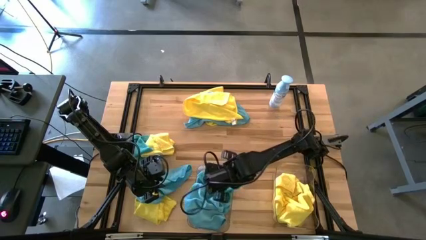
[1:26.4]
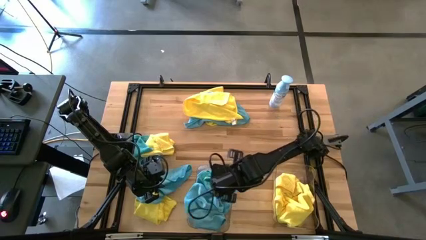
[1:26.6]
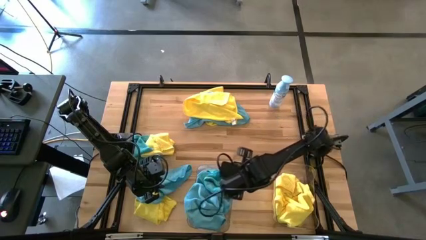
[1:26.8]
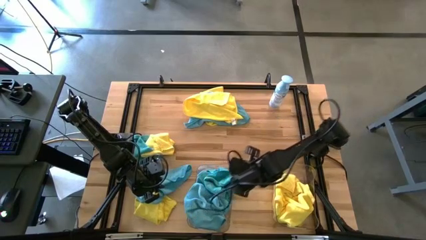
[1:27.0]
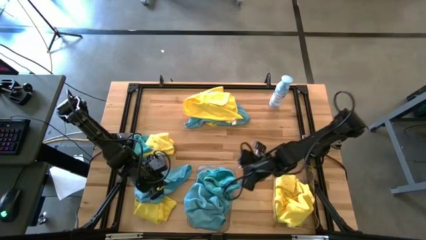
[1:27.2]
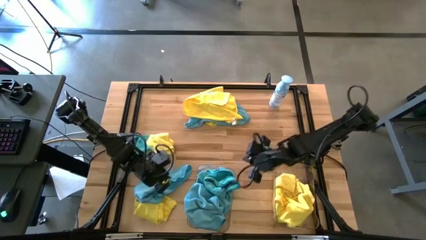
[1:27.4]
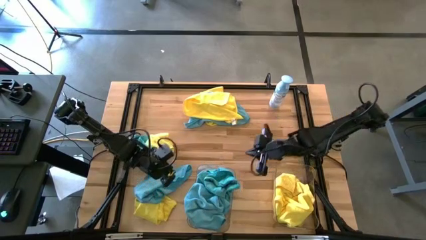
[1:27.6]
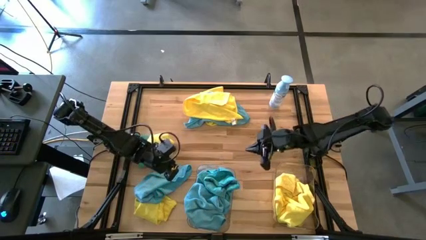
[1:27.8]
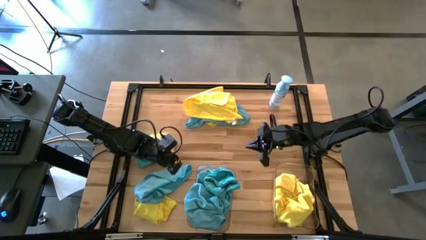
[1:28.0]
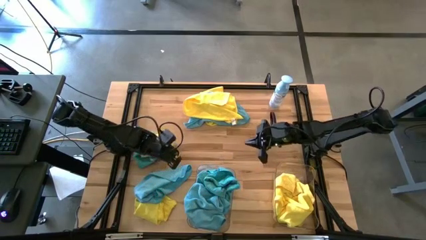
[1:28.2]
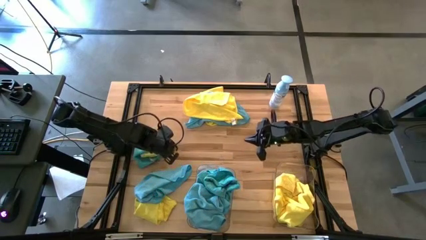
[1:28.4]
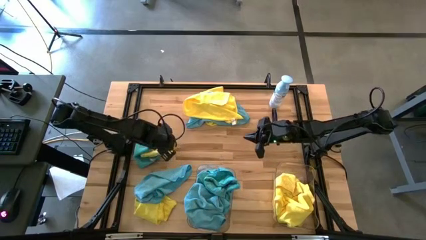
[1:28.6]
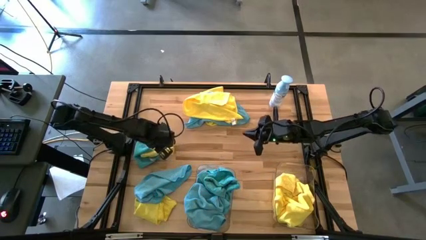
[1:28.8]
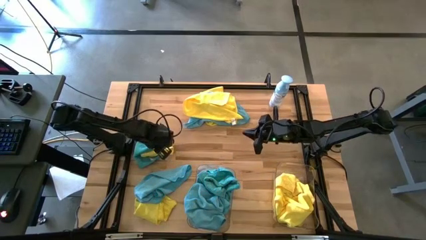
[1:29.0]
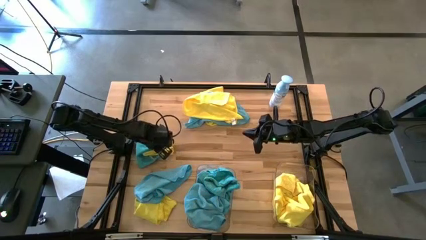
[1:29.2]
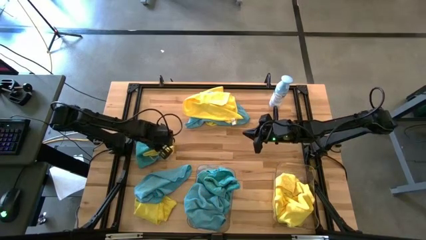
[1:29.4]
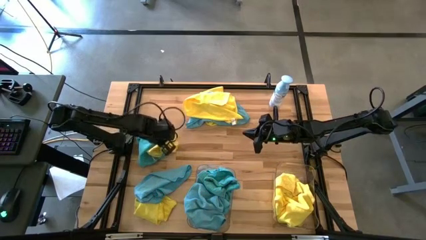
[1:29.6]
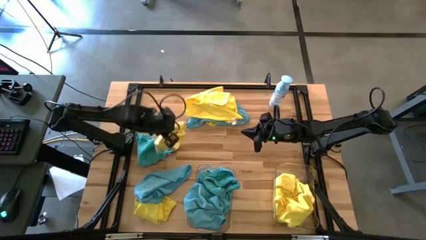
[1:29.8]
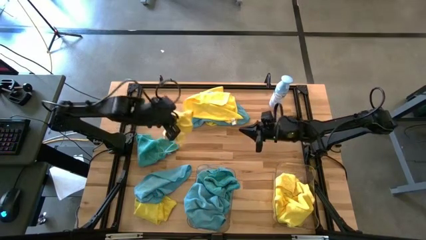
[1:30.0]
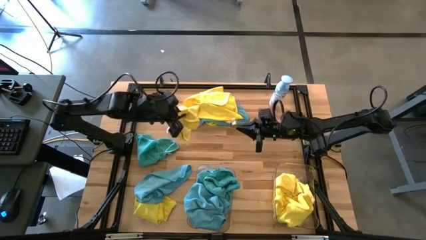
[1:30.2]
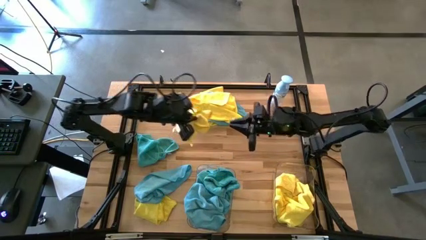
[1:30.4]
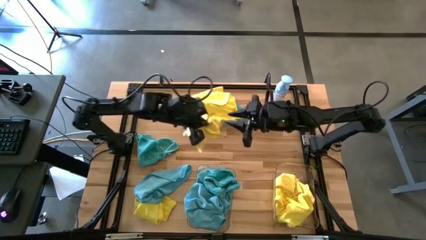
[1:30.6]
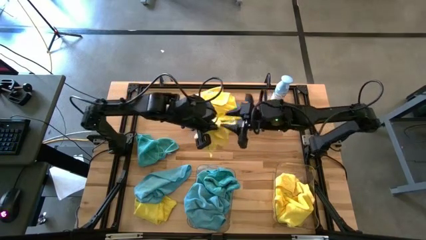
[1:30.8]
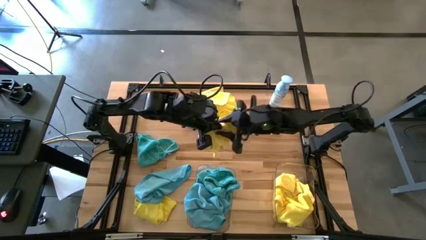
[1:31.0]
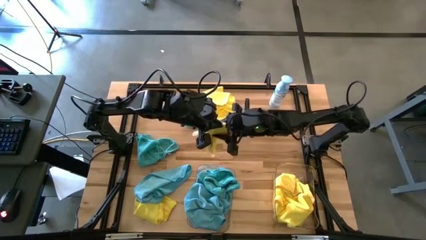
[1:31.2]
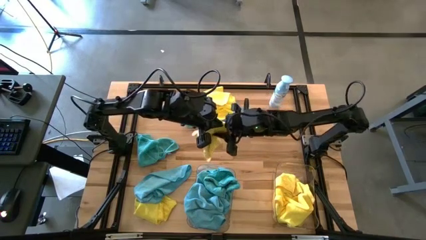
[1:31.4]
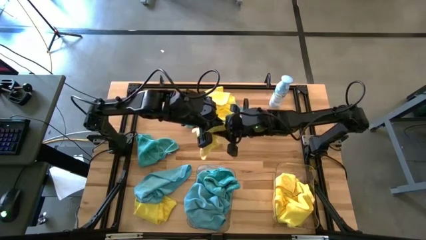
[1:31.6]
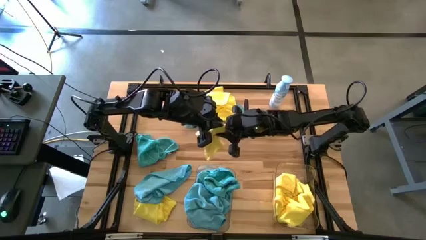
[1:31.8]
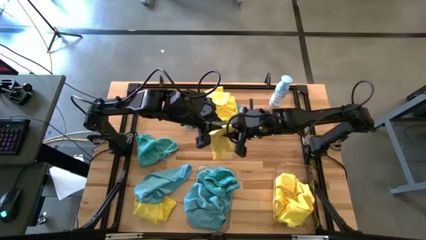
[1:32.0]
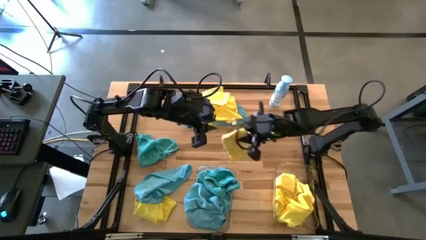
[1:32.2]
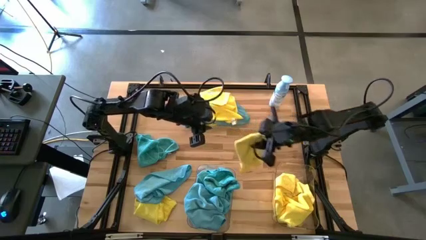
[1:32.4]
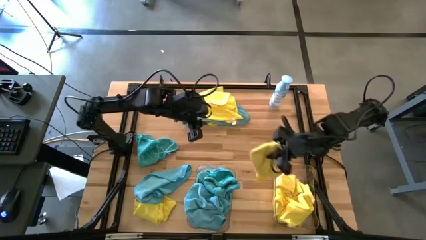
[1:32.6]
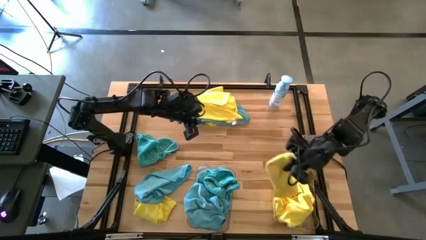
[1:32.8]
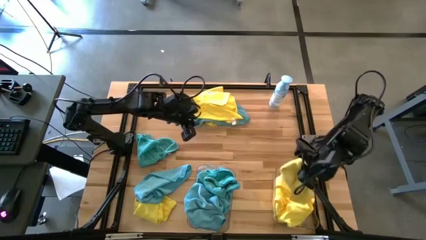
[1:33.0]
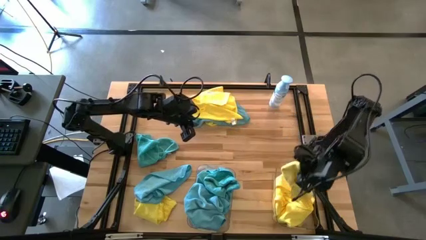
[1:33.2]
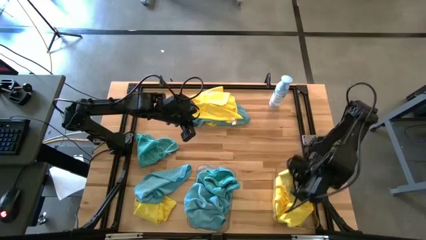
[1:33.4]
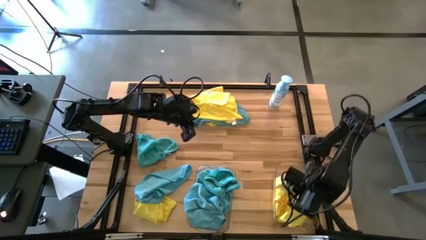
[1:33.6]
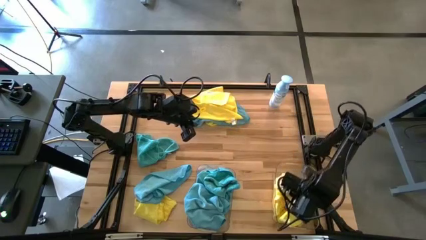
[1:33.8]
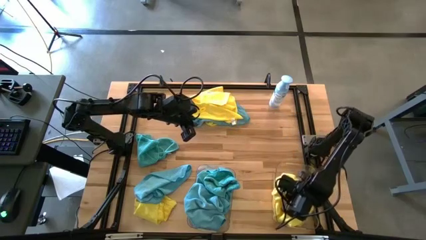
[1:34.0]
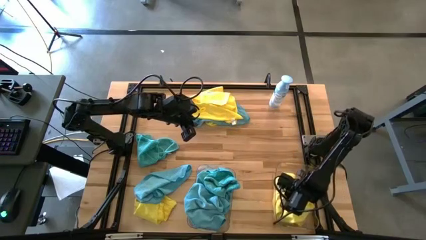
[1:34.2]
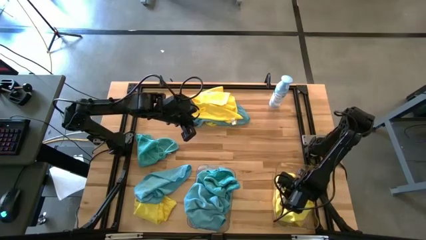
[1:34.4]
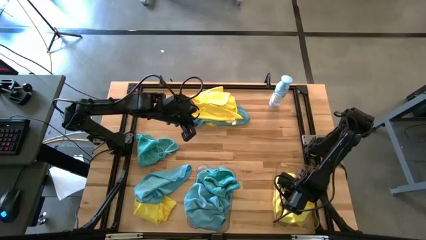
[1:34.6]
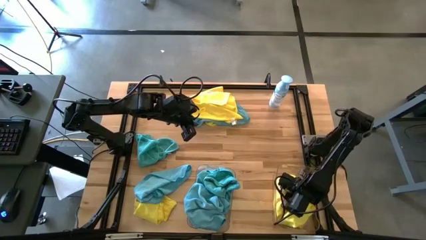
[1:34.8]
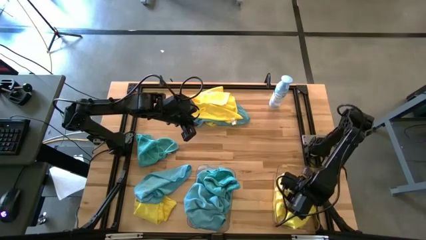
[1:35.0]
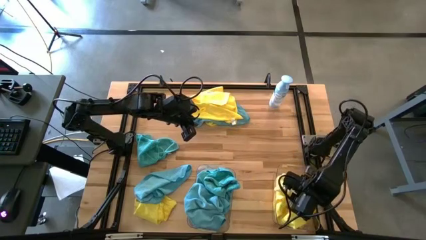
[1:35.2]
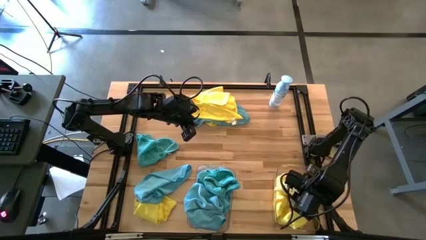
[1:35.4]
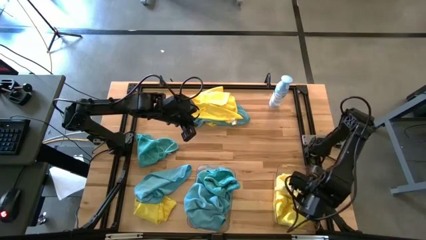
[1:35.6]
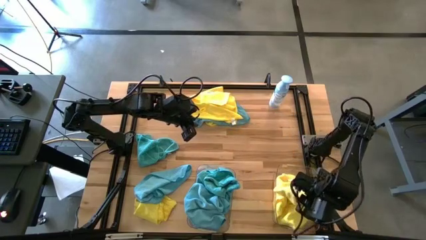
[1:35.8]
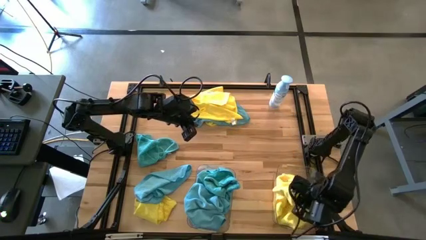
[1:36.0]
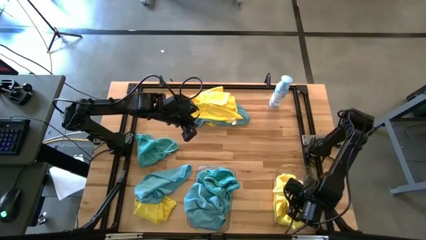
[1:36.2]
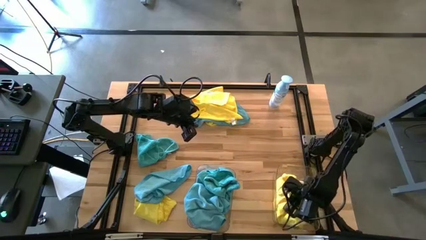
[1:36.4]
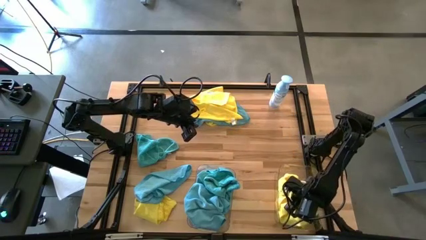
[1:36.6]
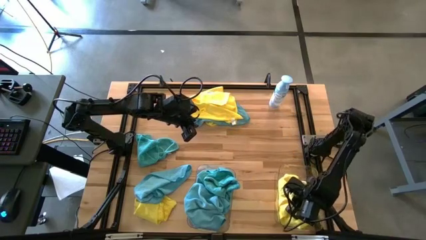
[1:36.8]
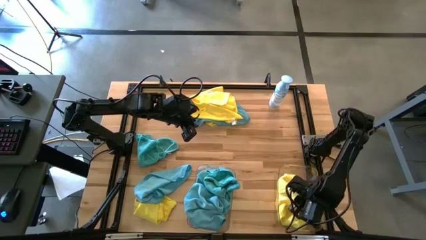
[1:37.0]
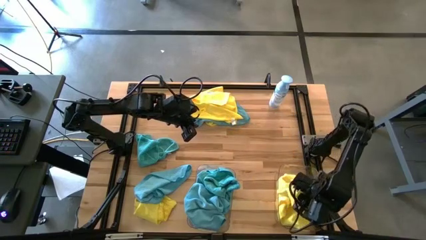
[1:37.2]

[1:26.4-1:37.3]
Task: Sort microfiber towel by color & place in baskets
Put the yellow towel into the right transparent bin

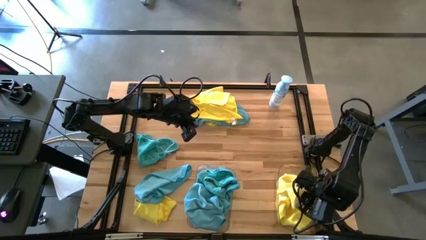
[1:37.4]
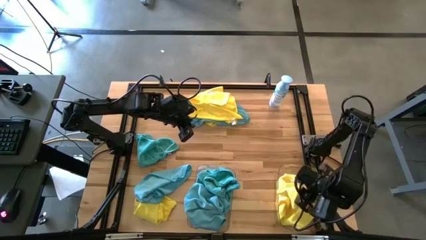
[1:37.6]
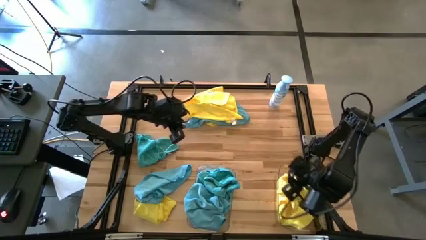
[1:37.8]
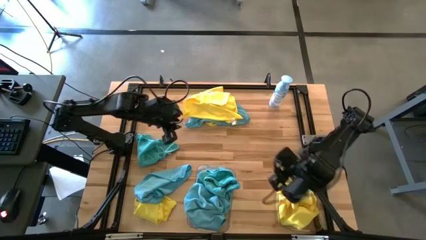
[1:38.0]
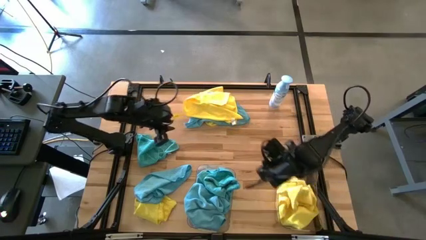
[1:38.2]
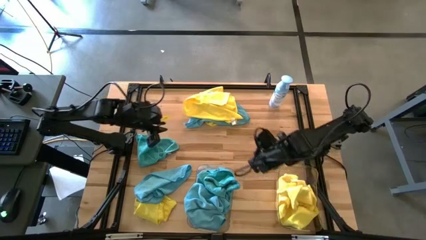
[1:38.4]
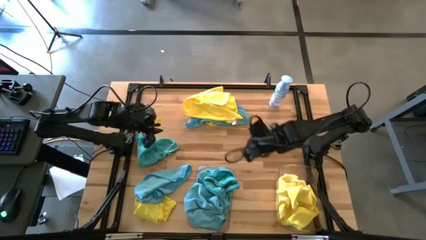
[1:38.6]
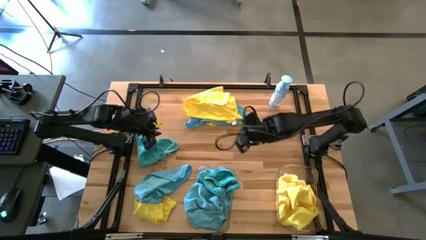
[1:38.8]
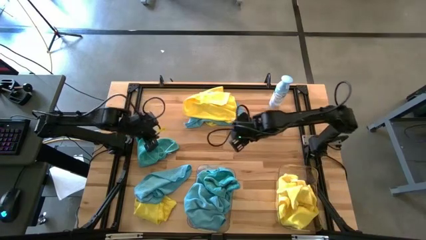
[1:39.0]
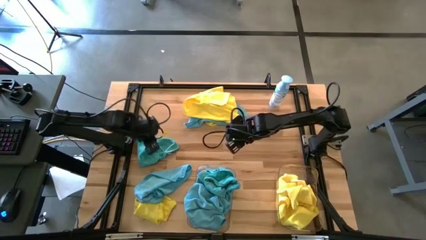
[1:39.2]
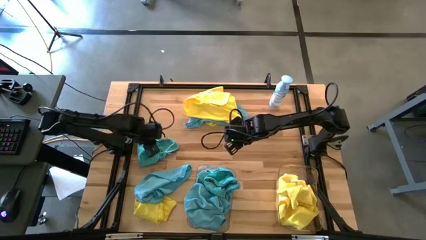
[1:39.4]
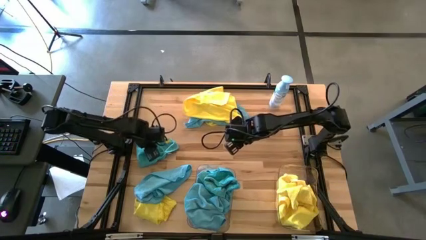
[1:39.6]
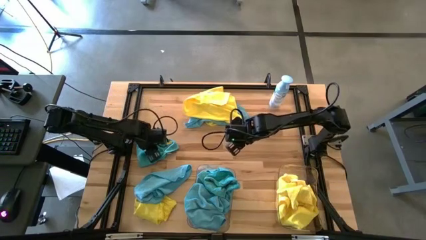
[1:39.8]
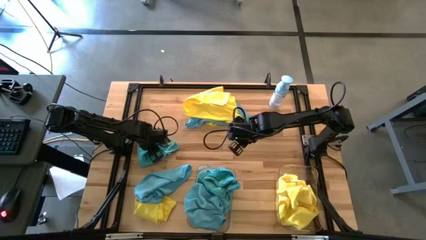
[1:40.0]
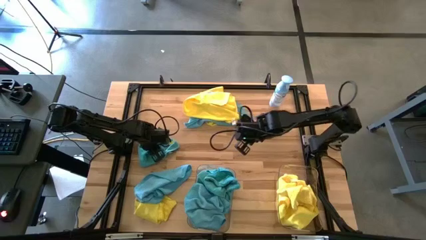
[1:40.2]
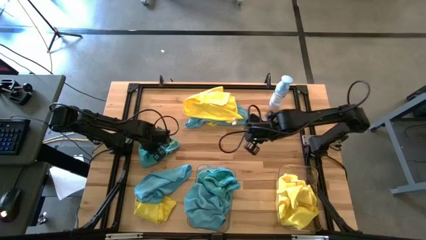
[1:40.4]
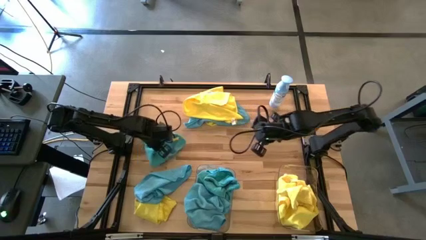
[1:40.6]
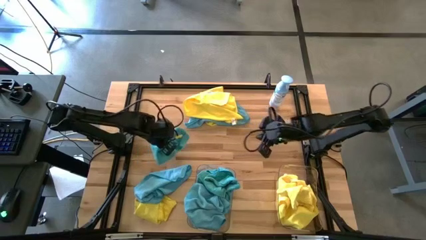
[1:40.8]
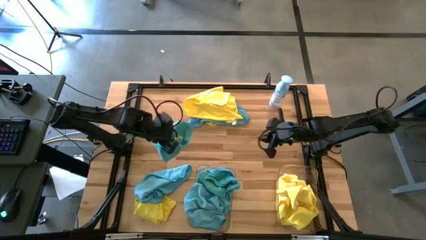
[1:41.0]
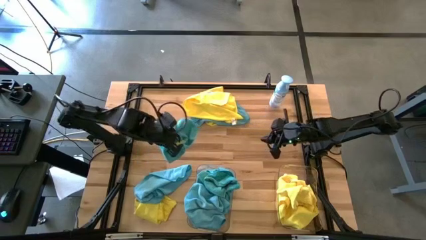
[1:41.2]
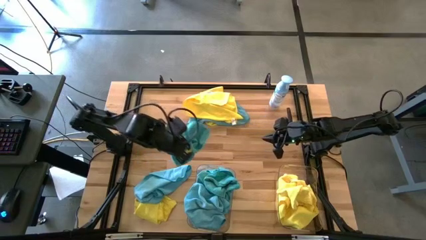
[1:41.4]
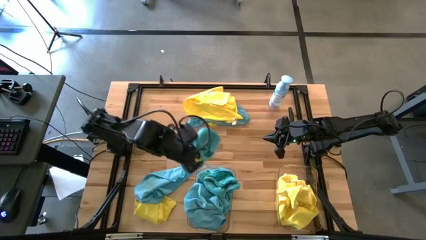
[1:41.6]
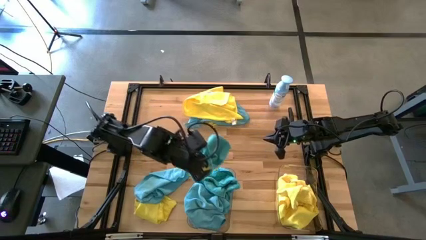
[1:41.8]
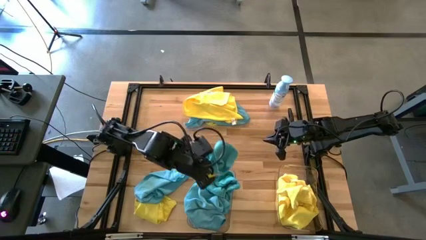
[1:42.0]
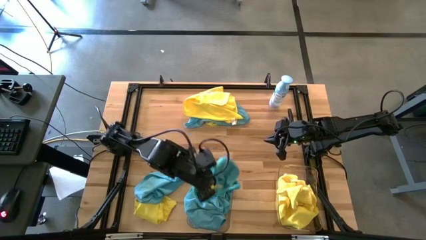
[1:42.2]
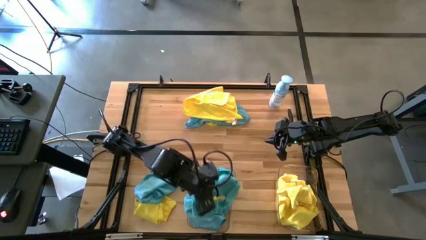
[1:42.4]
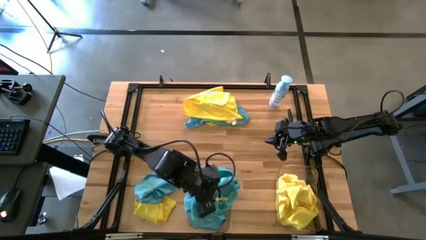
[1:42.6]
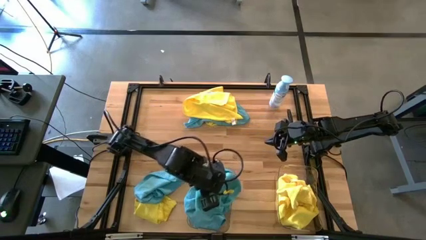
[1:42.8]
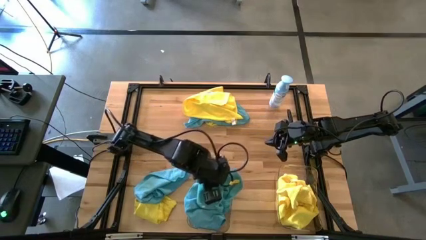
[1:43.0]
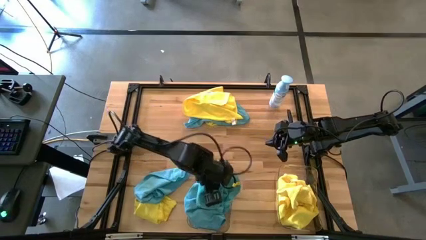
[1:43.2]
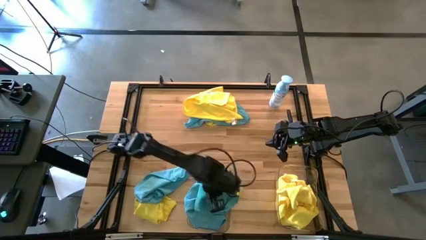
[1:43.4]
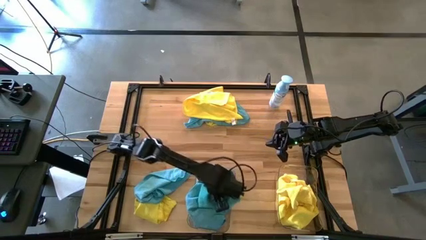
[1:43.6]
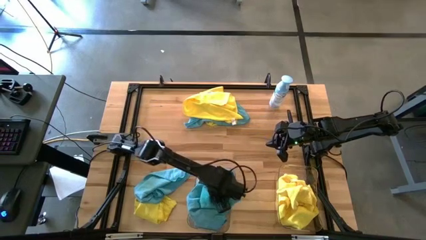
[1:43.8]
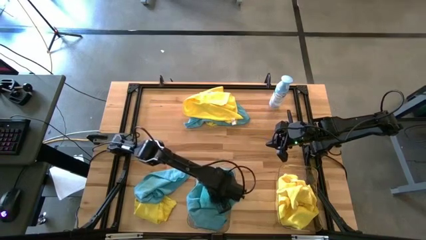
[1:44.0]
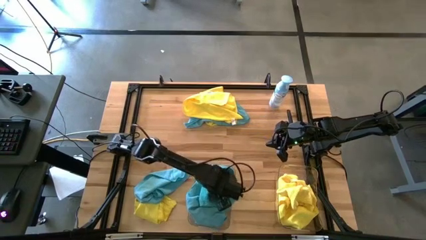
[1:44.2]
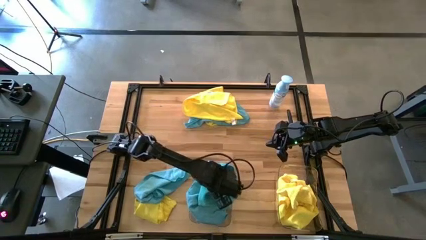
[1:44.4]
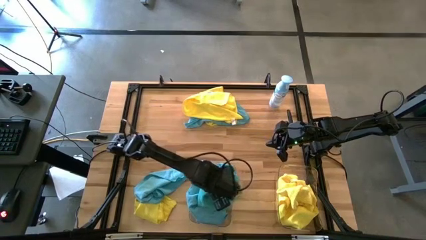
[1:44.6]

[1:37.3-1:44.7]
Put the blue towel into the left transparent bin
